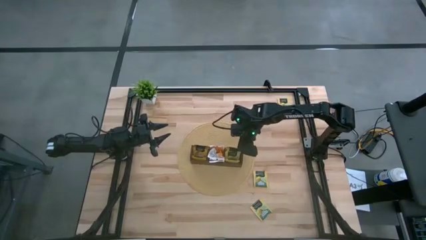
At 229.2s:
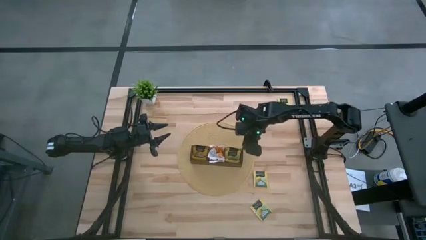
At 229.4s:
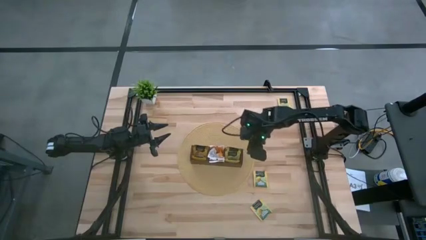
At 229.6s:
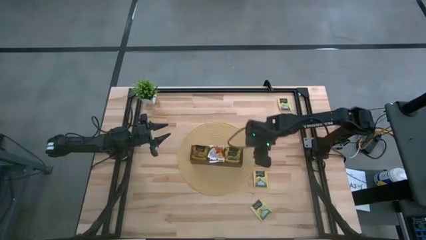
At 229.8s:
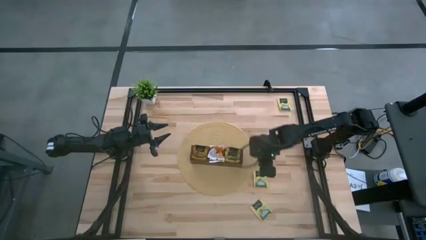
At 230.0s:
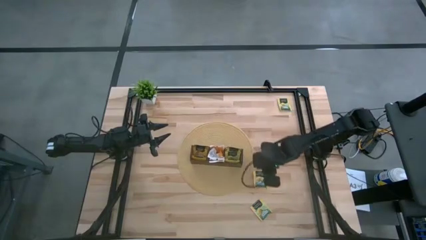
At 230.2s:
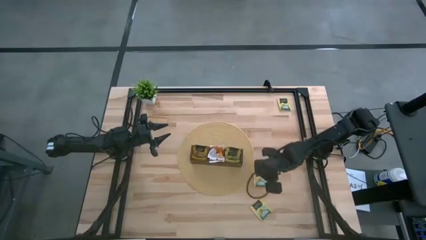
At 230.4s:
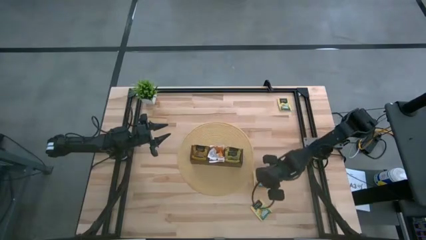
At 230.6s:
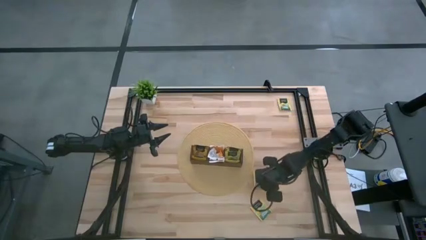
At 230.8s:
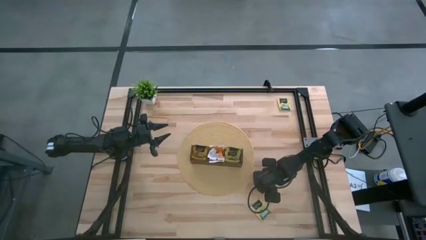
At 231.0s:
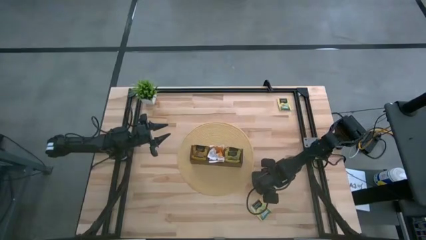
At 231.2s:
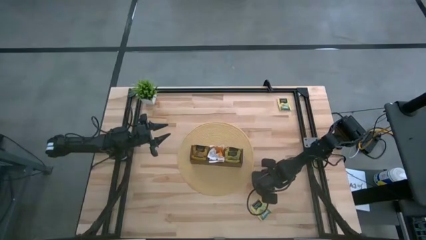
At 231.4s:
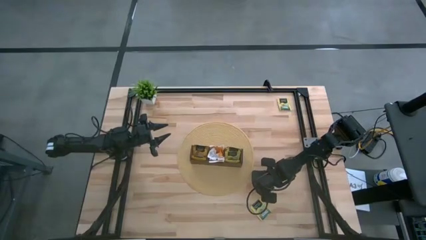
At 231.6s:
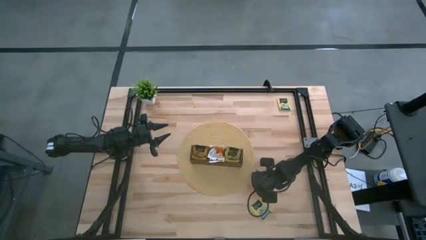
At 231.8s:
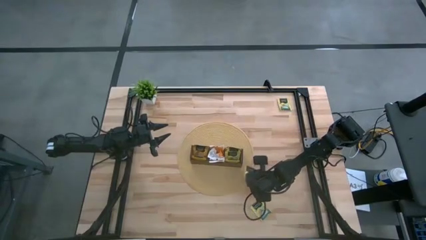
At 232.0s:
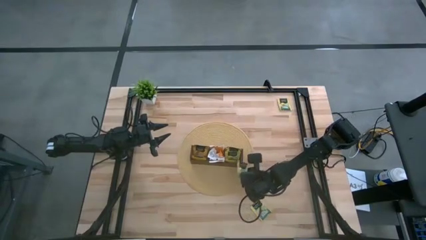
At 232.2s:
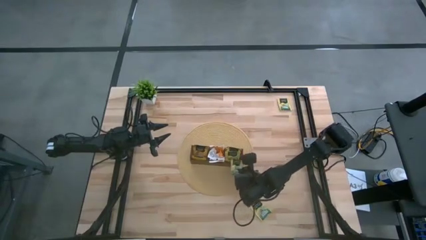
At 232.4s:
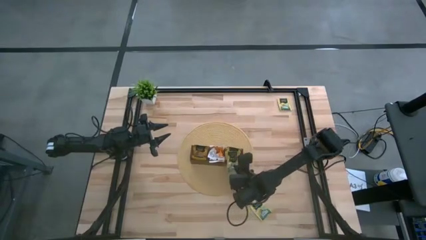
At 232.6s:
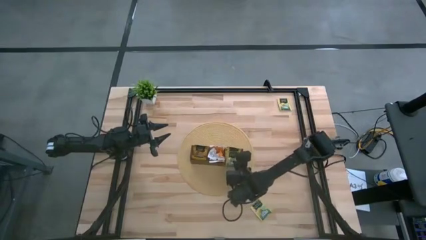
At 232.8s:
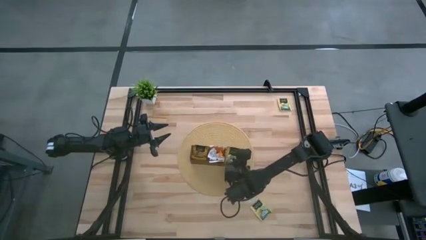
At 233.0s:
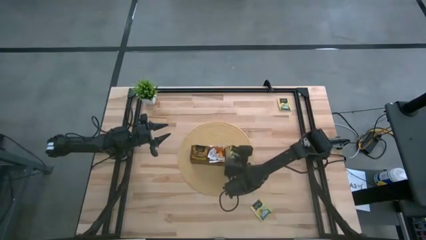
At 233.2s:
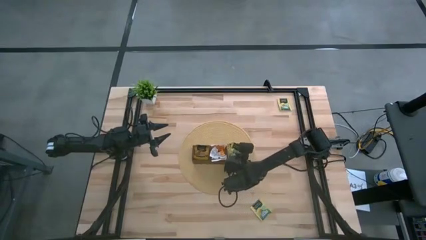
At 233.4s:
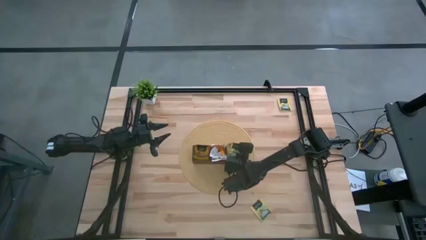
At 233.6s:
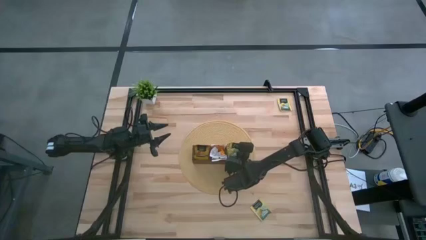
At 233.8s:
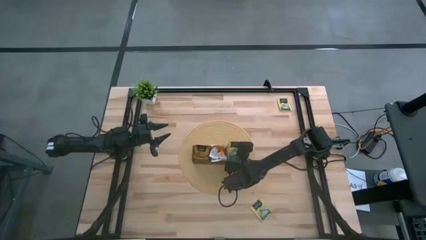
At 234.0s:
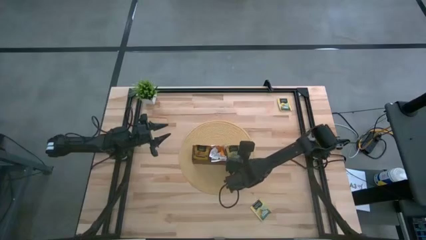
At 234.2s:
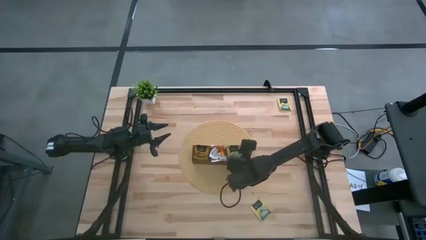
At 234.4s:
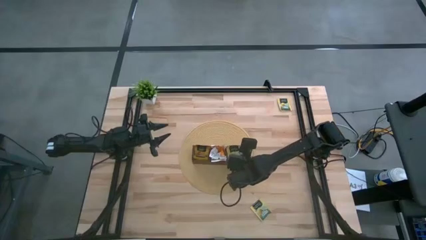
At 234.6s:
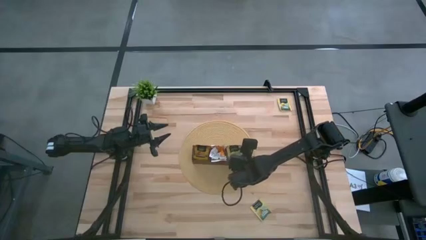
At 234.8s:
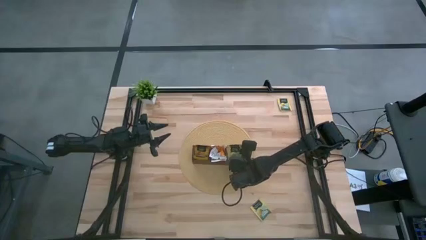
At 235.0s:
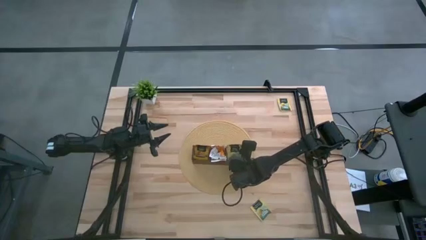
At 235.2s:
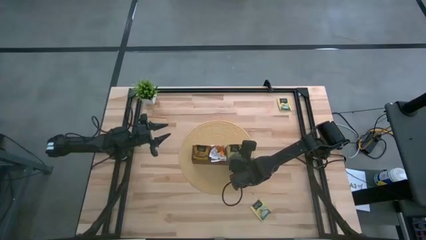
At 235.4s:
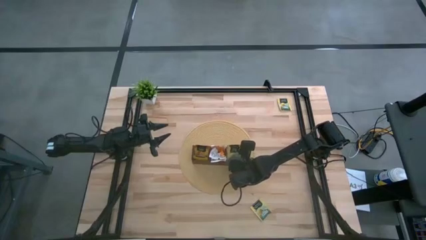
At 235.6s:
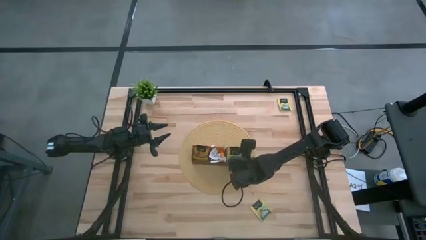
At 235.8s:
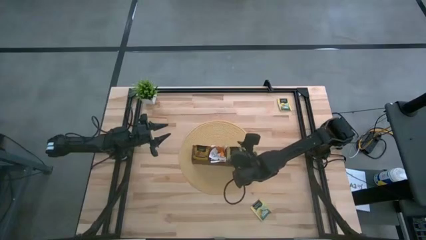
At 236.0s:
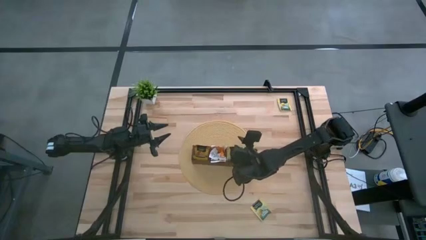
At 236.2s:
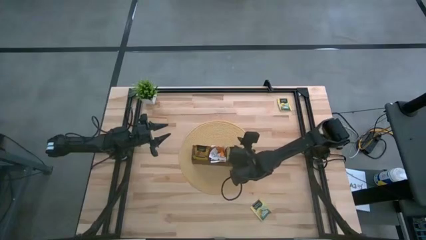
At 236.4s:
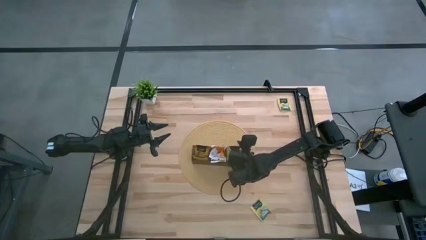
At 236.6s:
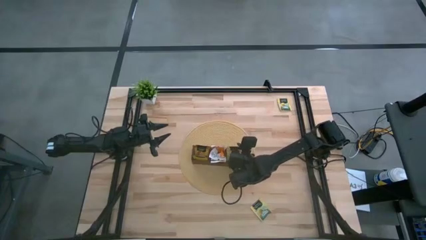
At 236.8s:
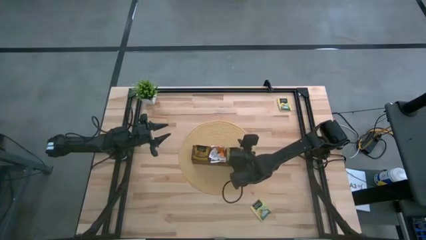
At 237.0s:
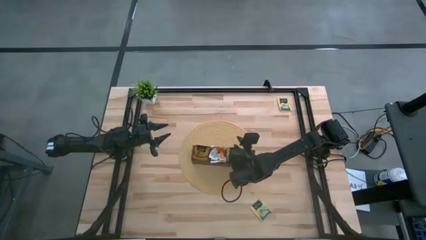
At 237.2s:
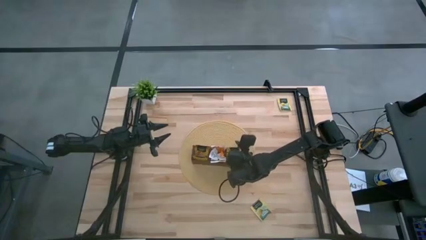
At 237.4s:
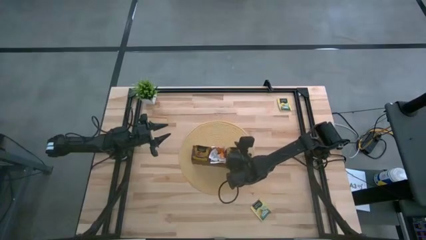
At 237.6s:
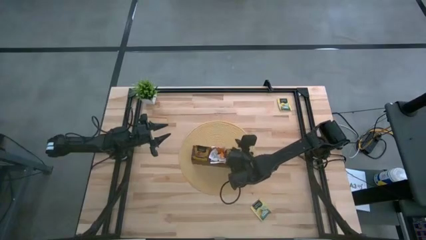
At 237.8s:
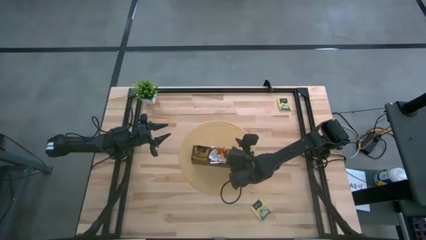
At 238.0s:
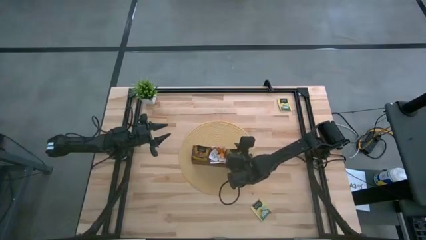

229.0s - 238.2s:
Task: Pick & Place Tea
Put the middle lemon tea sachet into the right section of the wooden organizer

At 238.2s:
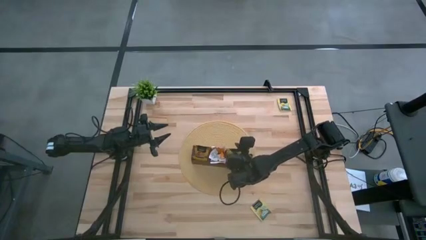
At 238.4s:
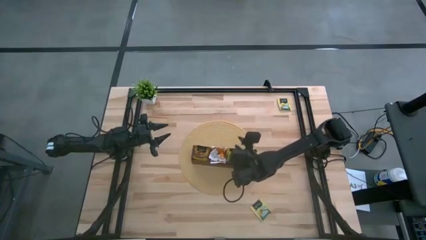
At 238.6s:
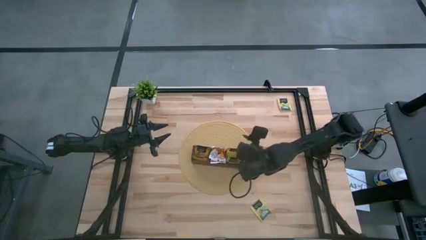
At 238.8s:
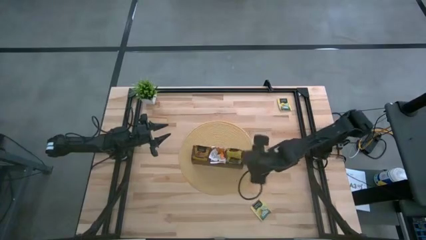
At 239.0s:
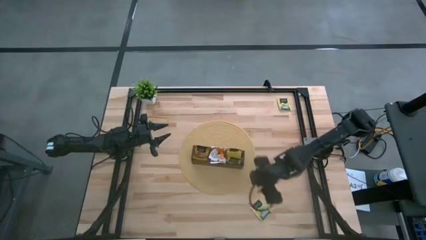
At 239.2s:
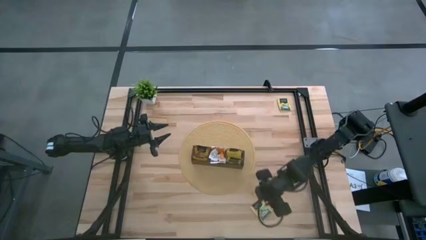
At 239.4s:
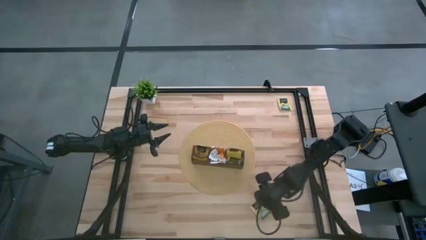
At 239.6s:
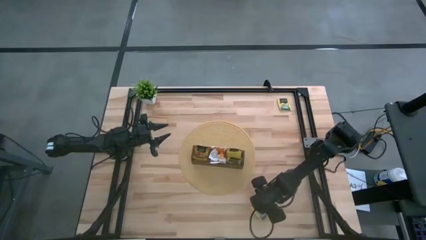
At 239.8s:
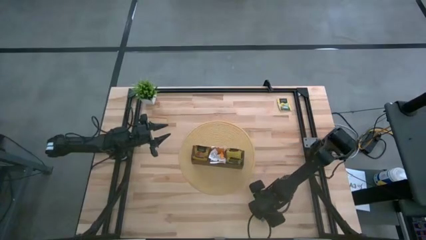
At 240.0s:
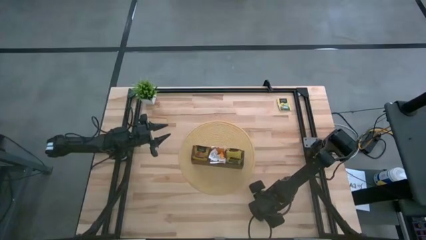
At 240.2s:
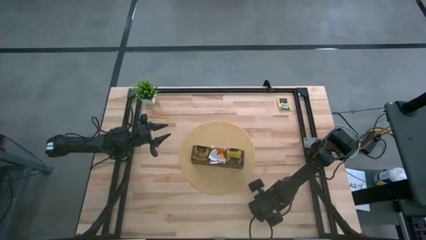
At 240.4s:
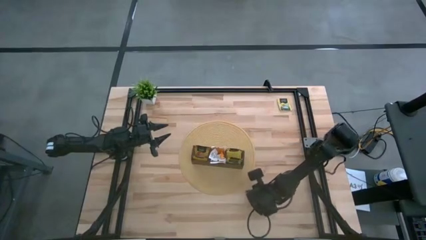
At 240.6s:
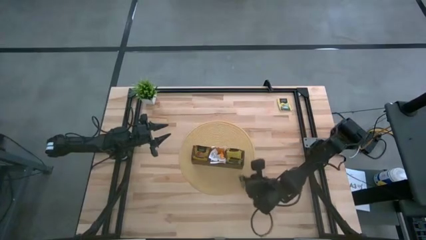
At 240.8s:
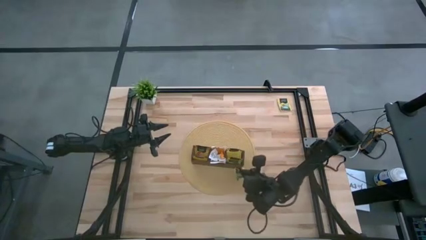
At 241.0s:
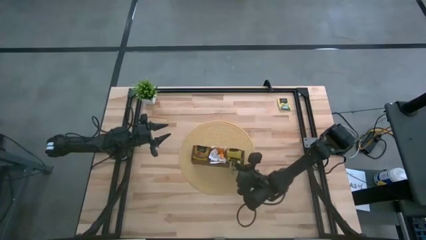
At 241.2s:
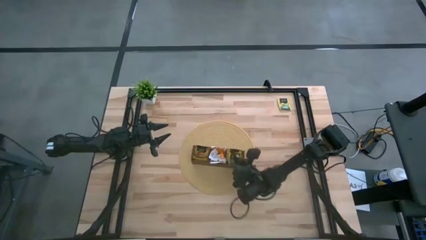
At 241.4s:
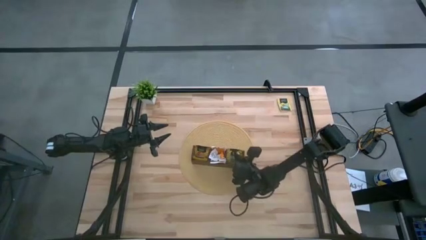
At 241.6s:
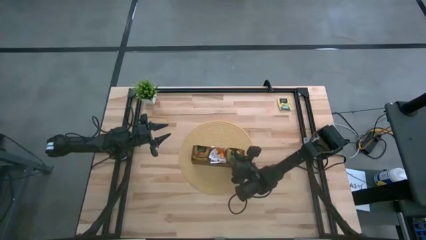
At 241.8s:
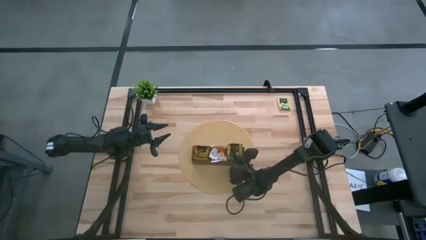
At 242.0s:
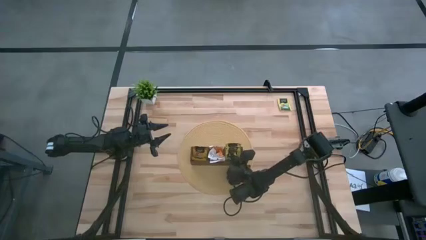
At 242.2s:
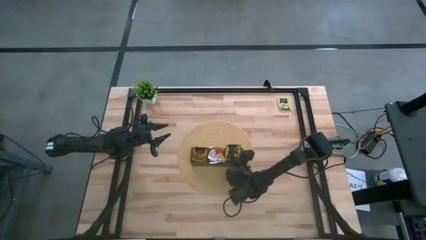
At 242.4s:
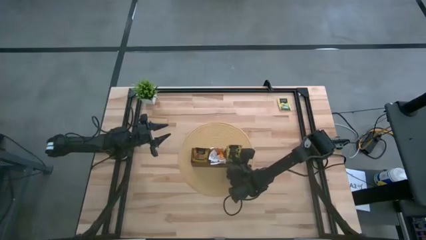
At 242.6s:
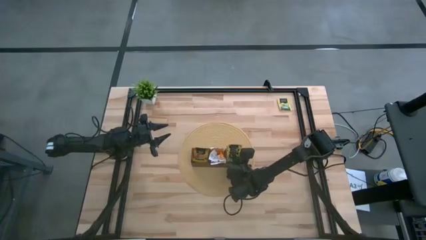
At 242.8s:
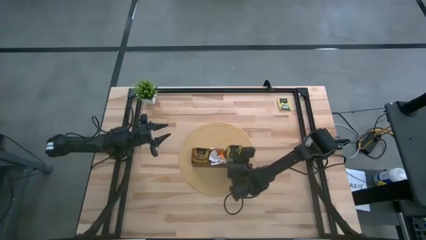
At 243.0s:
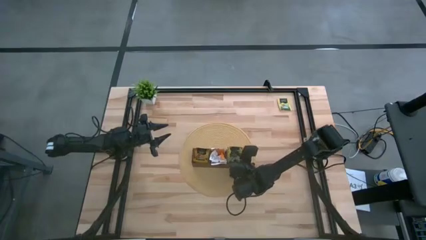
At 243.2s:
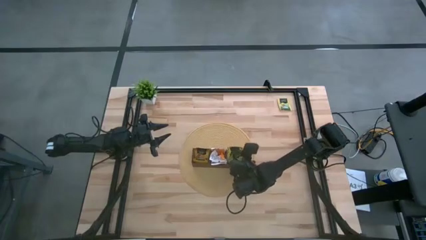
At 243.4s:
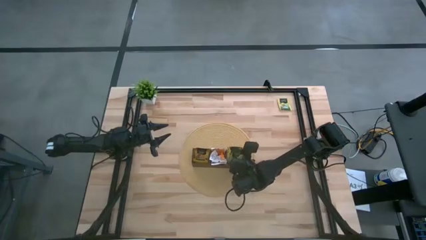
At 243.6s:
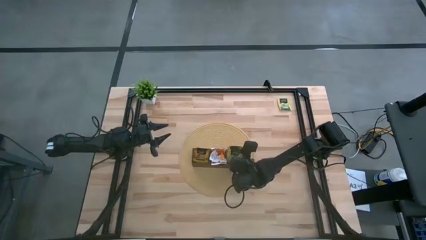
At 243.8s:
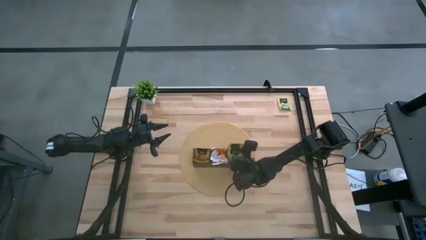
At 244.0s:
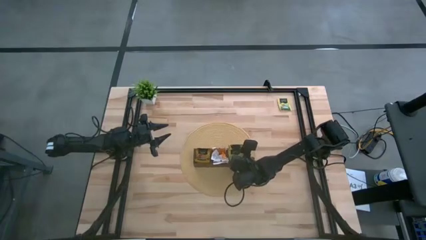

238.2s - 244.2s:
Put the bottom lemon tea sachet into the right section of the wooden organizer

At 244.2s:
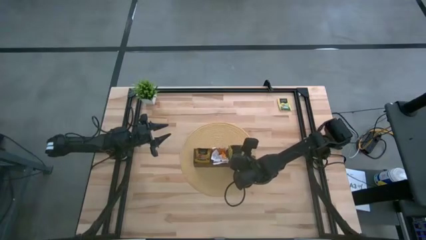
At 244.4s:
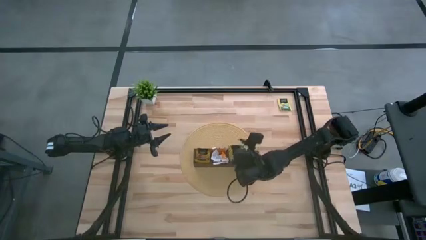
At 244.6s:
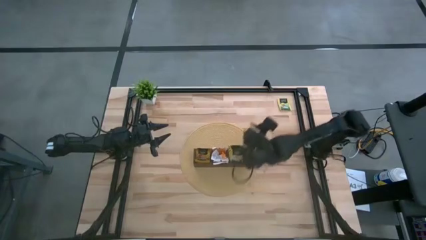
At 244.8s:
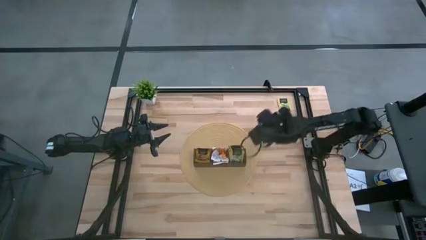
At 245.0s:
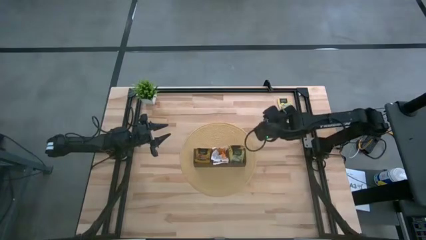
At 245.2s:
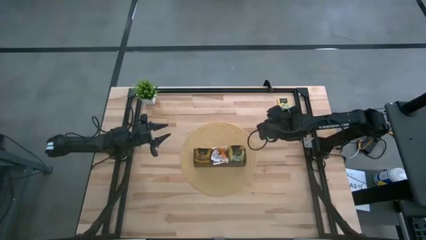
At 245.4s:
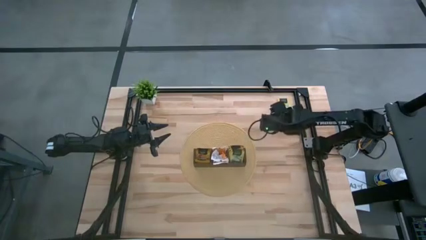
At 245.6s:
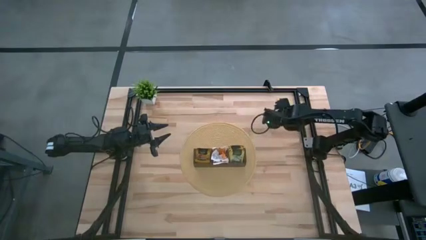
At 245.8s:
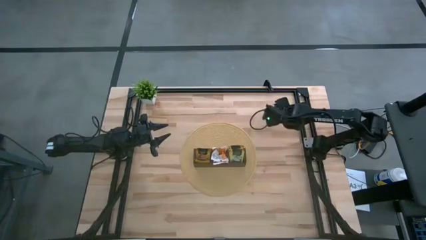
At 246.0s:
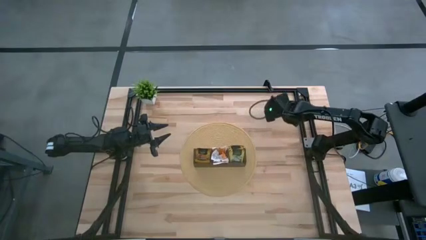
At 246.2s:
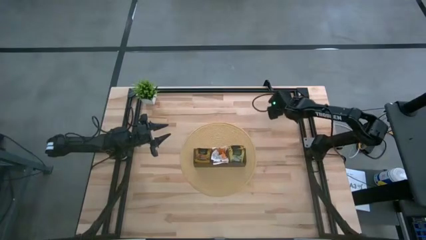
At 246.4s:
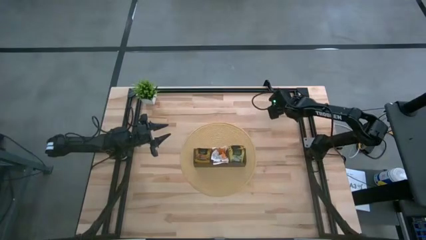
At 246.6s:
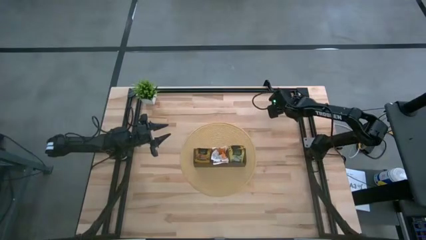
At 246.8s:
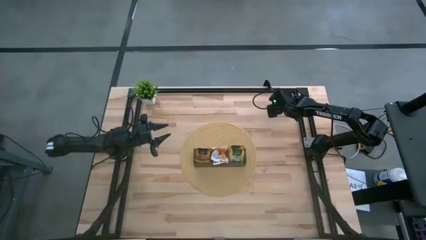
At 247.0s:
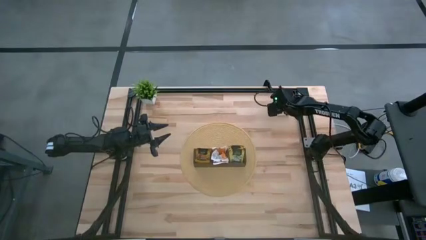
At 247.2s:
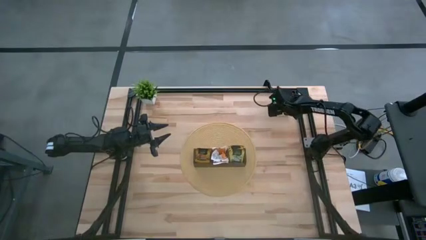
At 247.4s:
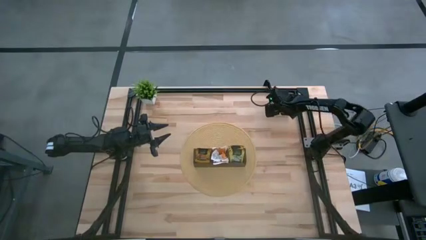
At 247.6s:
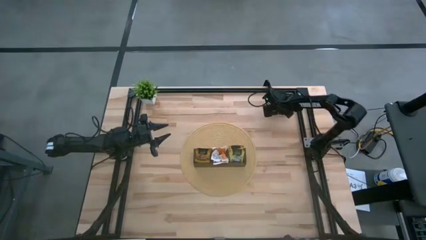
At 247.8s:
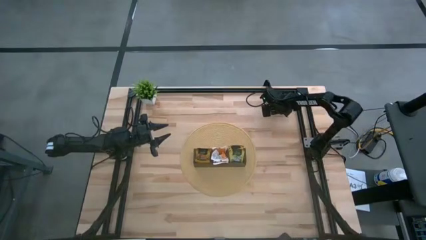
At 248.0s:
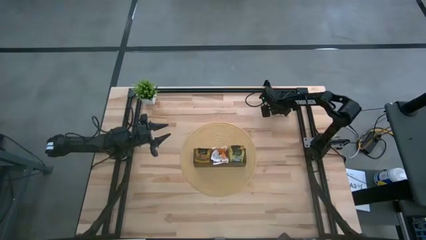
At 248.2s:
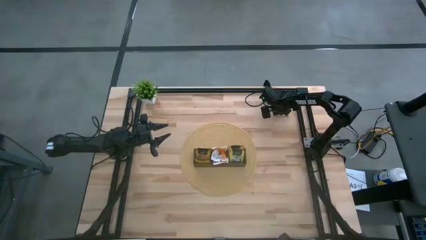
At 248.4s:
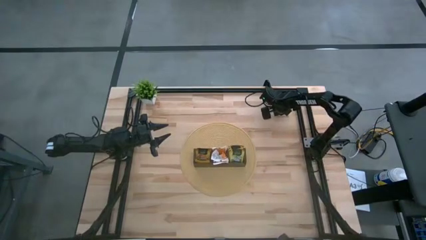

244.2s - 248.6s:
Put the lemon tea sachet into the right section of the wooden organizer
